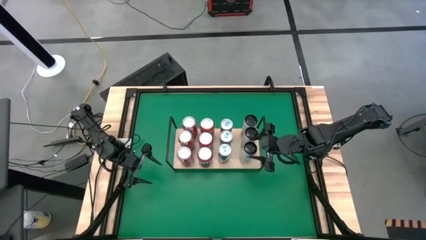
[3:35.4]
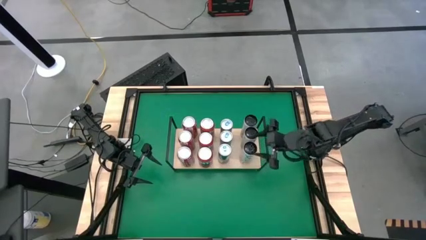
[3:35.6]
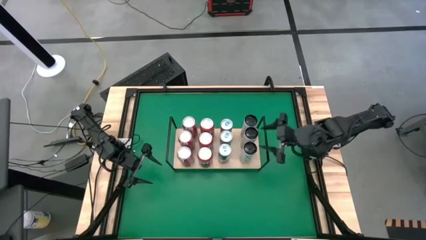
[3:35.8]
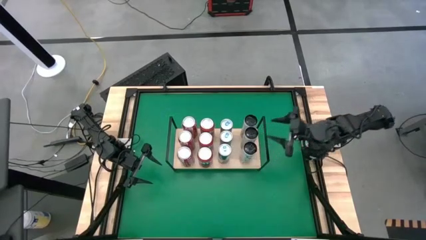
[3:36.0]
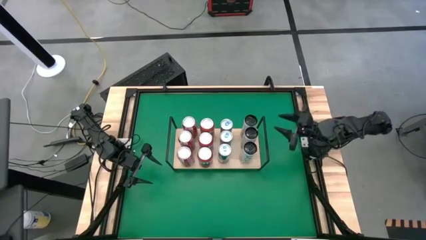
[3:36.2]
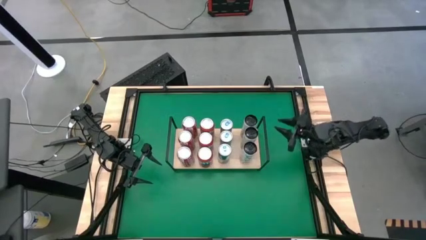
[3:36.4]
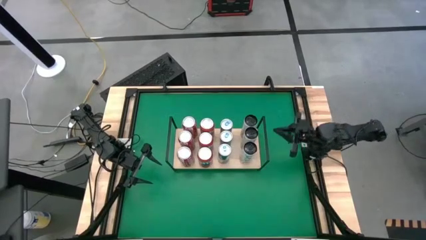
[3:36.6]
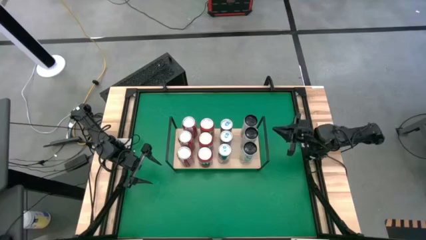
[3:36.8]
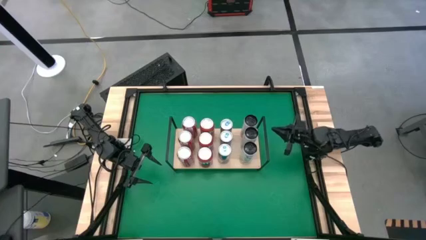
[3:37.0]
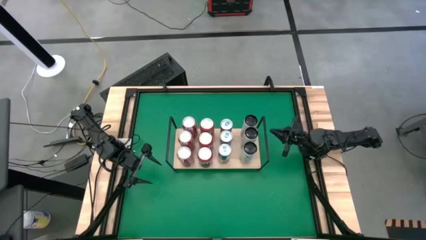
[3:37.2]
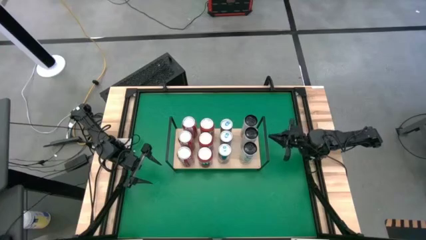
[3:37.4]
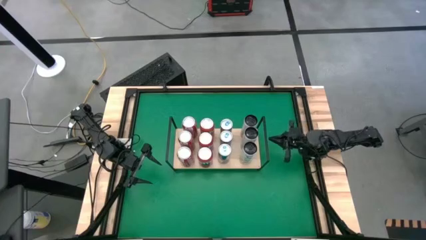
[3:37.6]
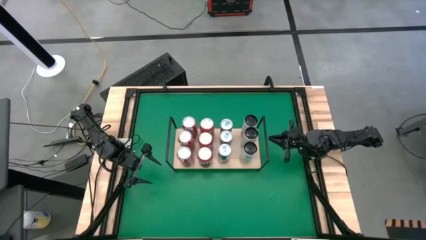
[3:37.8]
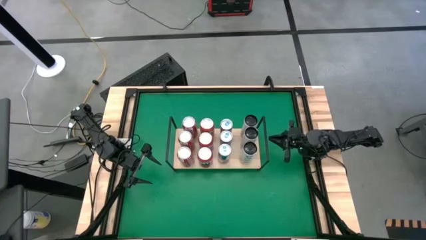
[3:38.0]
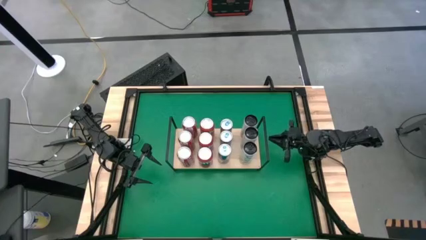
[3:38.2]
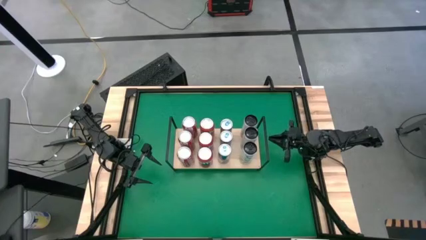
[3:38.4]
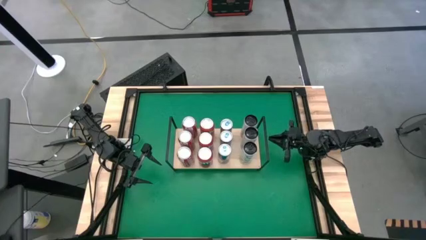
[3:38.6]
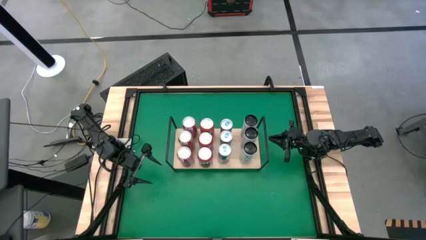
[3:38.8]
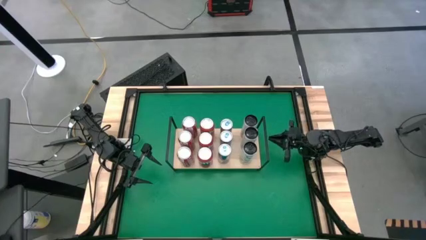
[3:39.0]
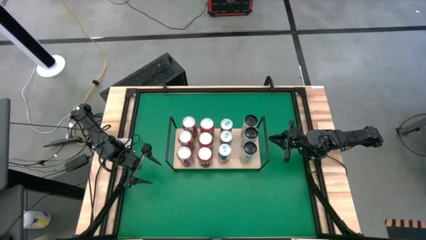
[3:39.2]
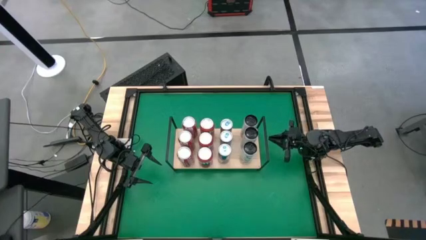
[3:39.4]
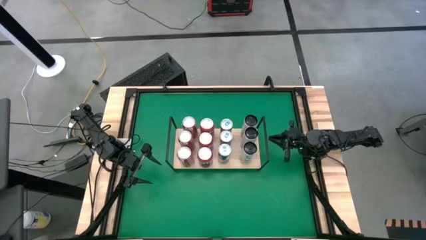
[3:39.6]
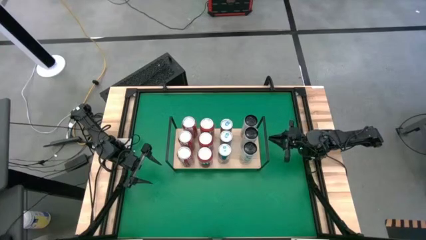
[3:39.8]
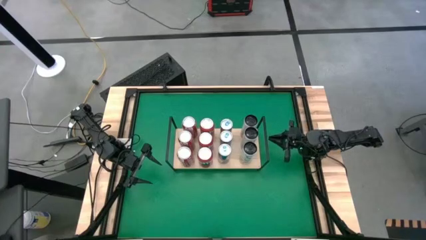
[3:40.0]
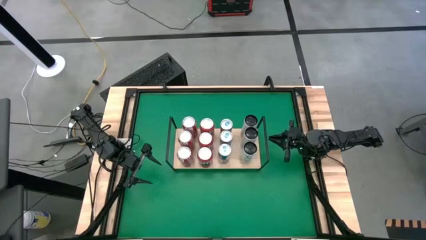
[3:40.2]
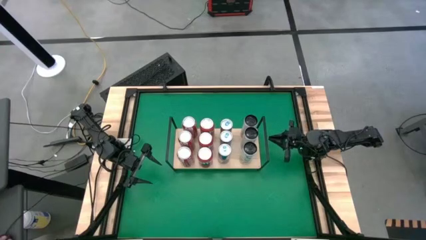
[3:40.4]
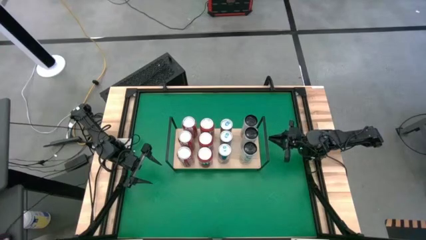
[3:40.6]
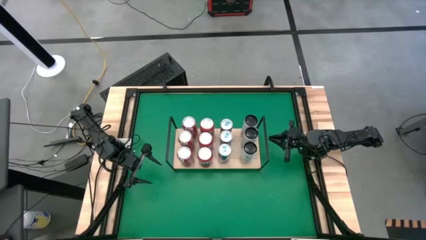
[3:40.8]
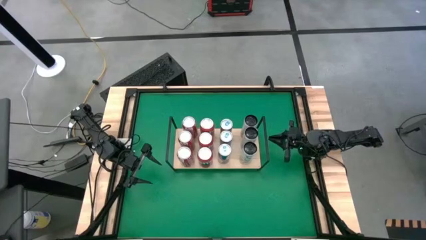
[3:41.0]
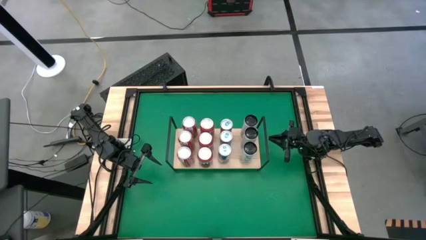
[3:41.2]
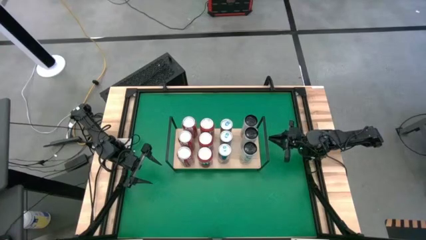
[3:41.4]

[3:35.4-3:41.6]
Task: Place canned beverage on shelf
Return to Home Position

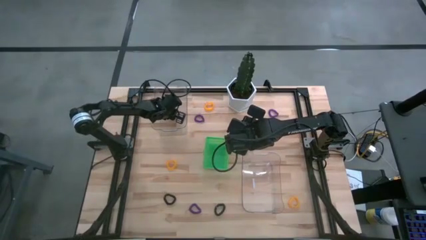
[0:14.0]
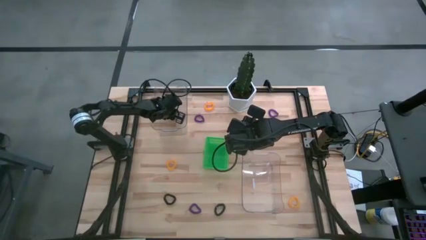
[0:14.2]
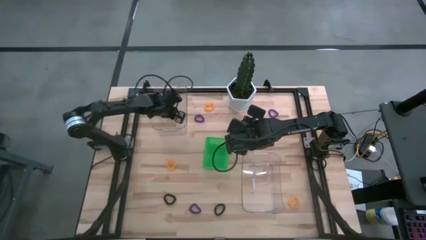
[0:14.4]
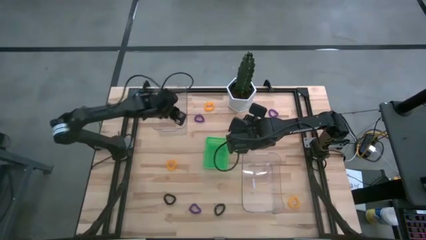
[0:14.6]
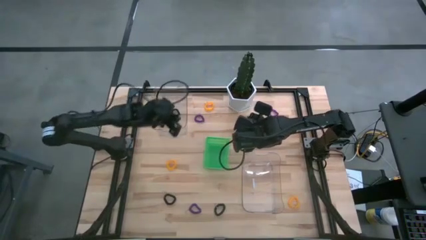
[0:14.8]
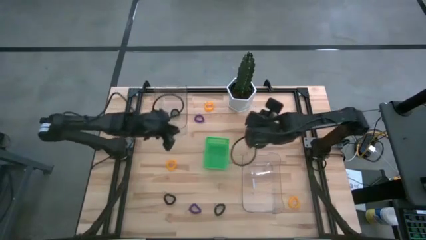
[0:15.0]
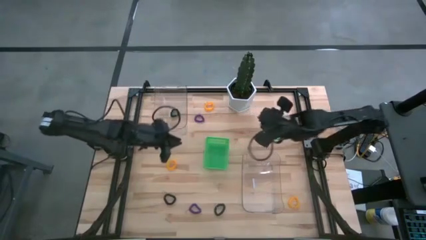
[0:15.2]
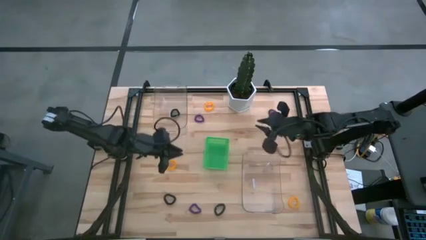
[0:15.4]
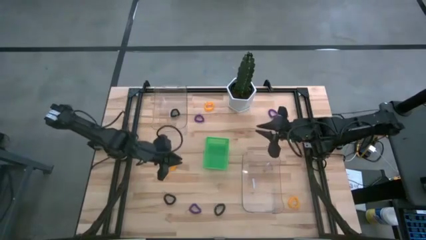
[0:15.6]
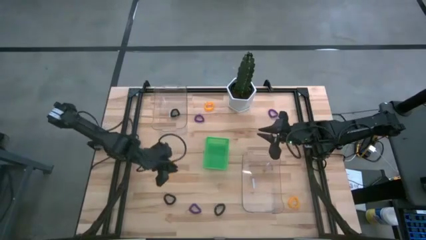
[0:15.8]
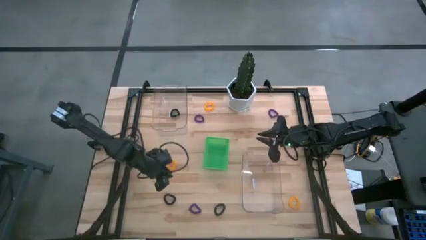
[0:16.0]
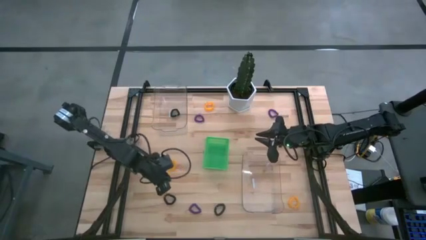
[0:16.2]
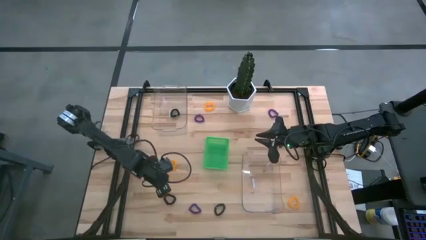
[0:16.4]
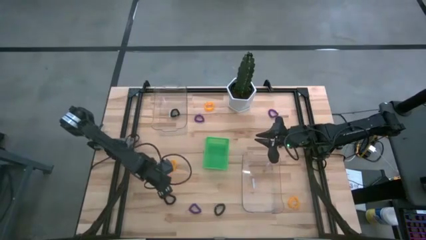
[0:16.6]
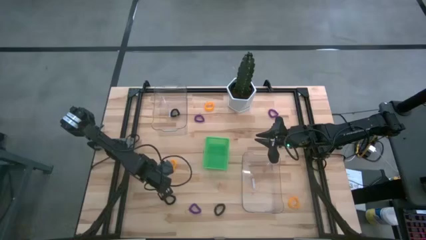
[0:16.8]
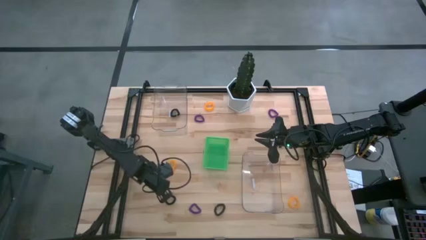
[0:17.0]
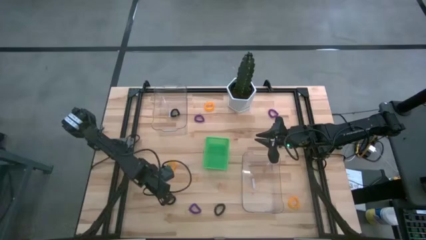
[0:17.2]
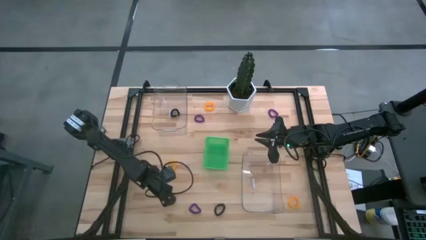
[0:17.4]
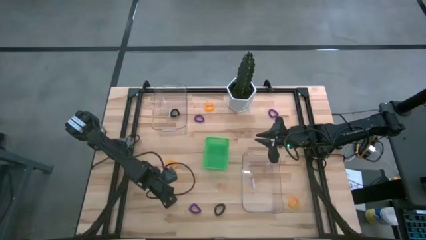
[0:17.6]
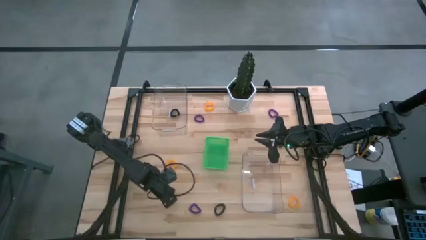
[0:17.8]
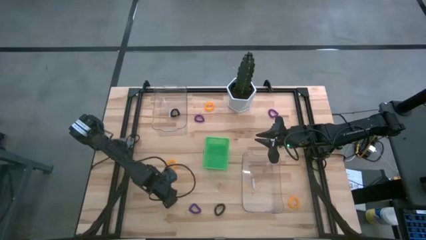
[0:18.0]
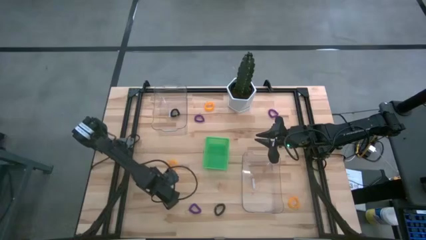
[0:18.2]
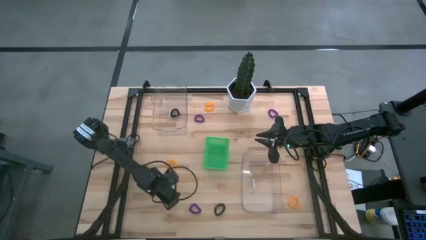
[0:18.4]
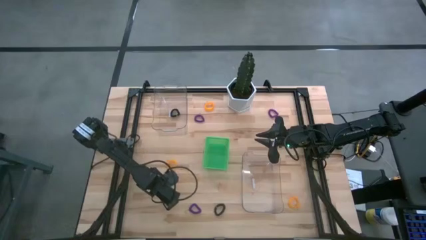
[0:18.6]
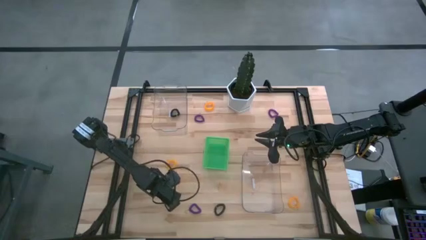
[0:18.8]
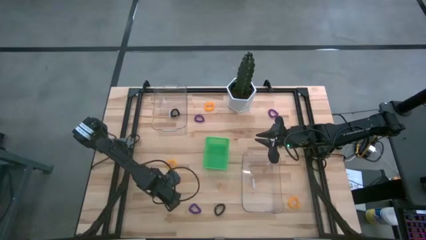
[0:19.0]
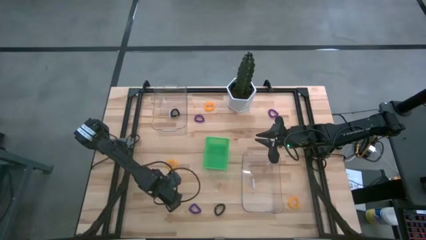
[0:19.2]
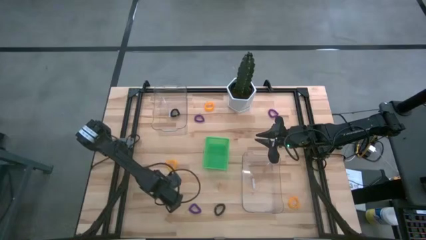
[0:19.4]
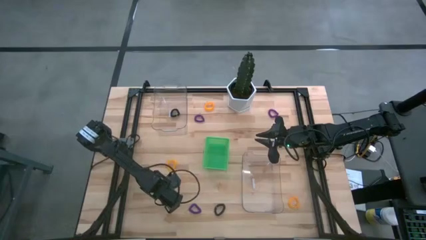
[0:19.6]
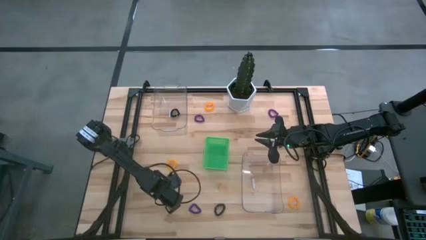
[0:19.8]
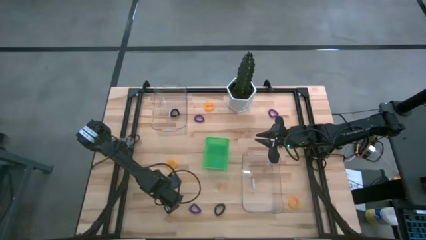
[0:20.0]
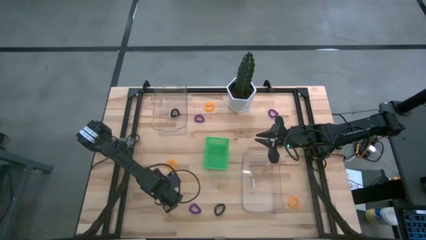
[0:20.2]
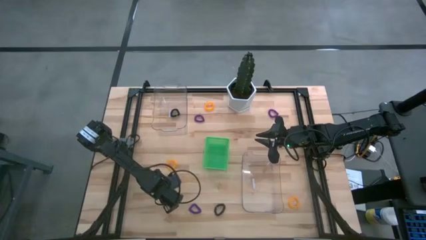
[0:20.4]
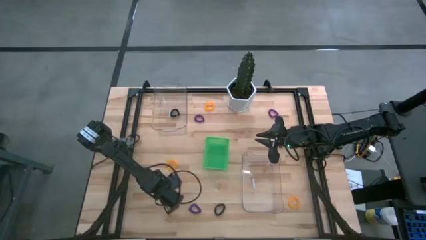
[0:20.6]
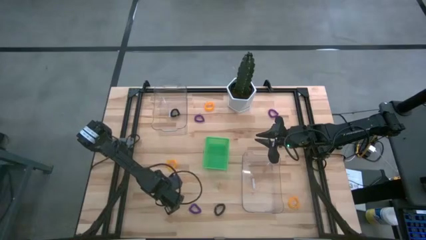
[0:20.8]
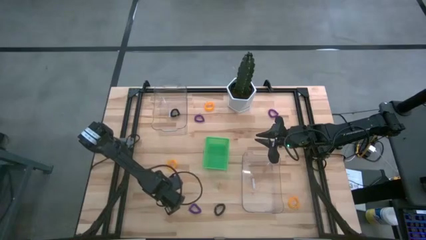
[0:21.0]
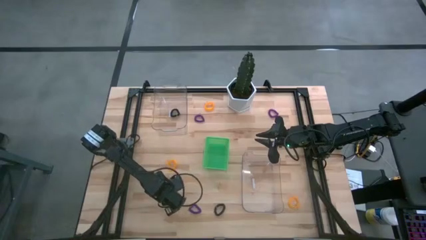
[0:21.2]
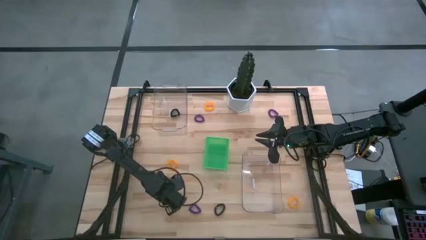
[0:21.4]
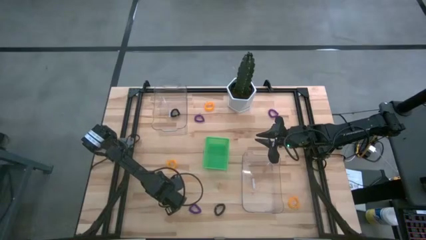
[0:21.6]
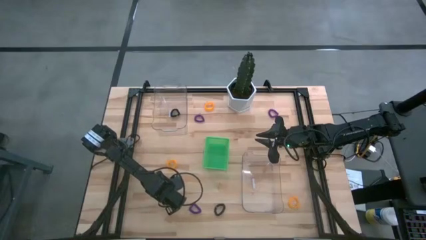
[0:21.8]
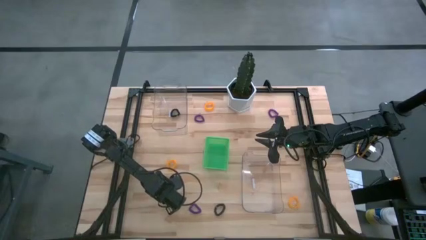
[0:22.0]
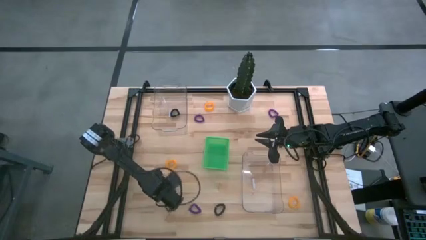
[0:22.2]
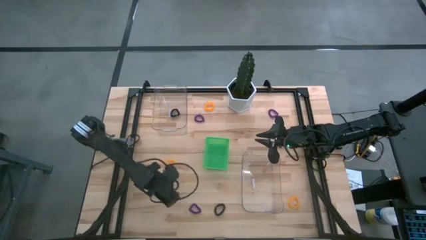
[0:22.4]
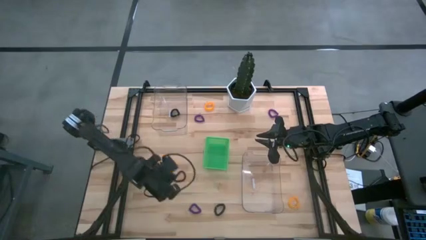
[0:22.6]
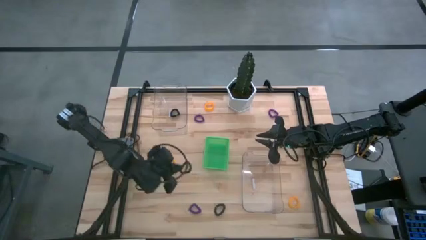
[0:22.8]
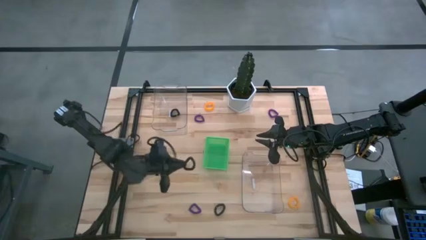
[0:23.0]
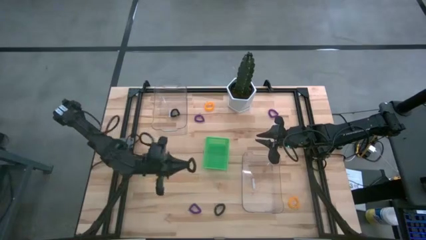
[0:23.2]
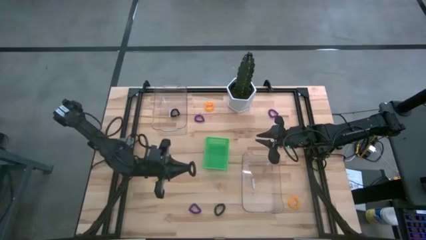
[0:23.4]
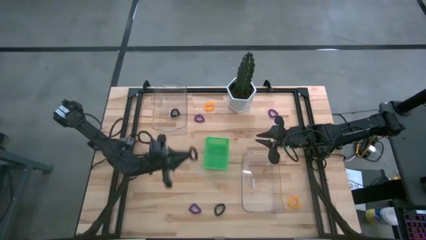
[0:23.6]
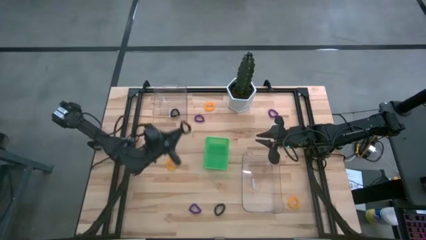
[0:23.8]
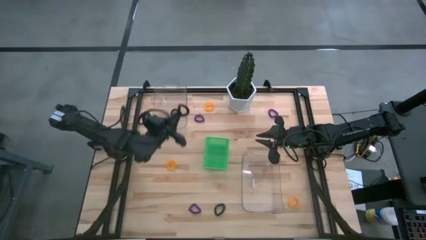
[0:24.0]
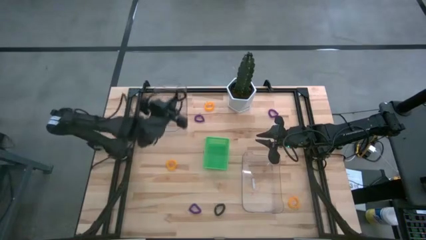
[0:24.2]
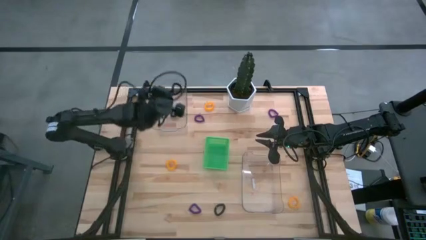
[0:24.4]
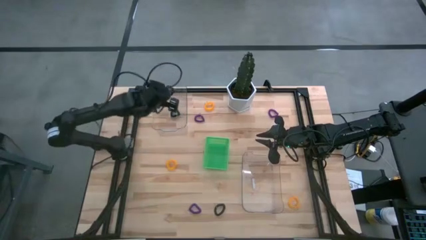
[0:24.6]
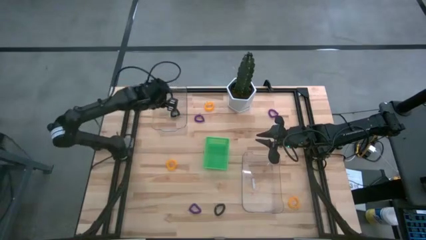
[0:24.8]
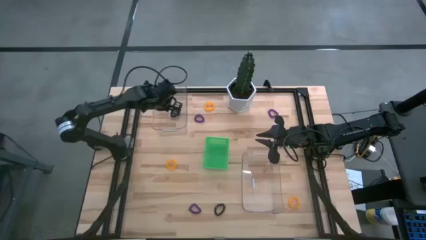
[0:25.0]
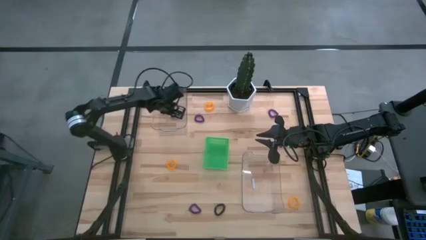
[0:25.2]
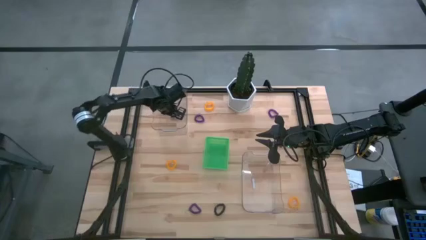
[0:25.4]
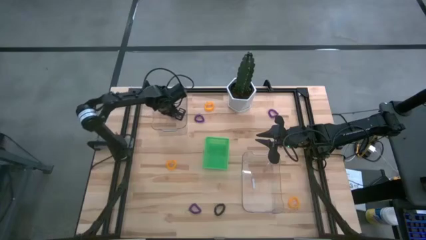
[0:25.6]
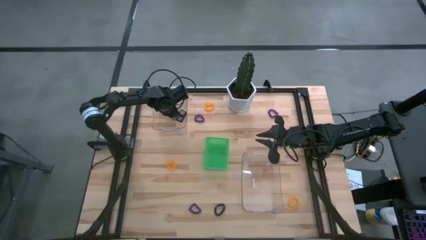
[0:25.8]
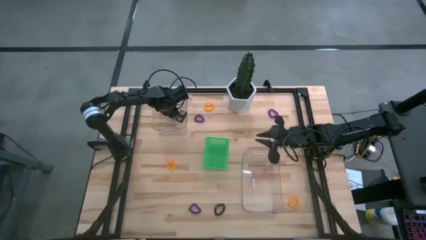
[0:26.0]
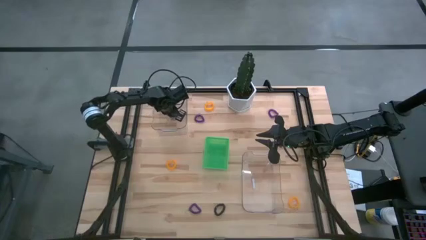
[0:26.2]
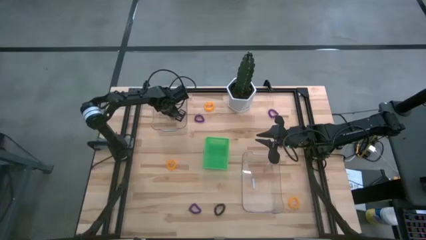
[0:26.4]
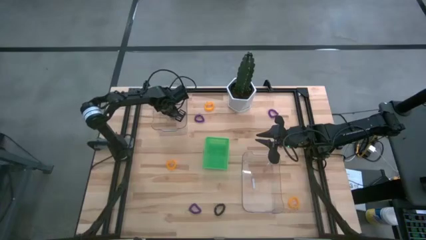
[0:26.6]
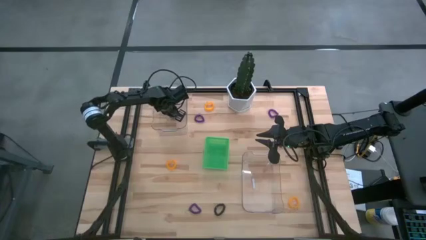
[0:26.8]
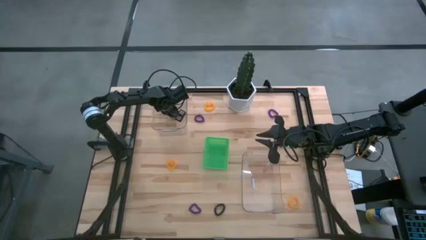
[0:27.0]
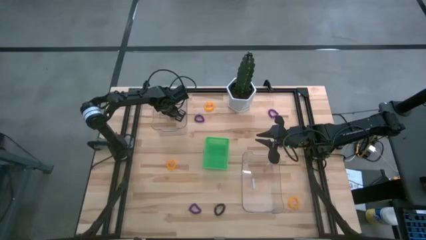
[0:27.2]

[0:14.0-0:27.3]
Task: Sort spring keychains
Put the left black spring keychain into the top transparent bin
